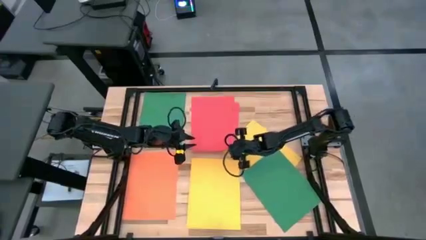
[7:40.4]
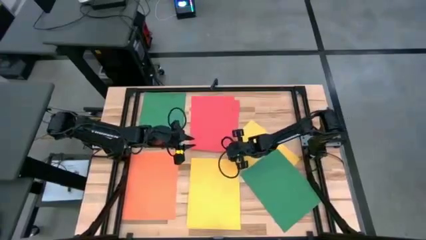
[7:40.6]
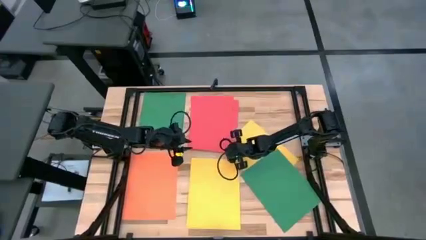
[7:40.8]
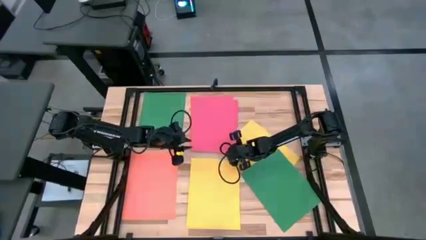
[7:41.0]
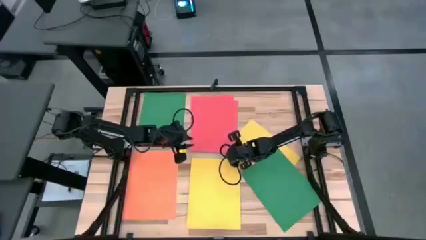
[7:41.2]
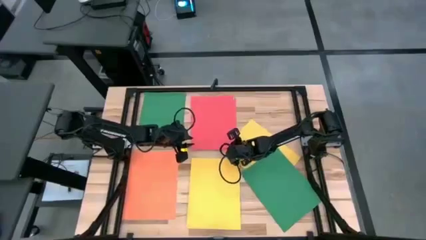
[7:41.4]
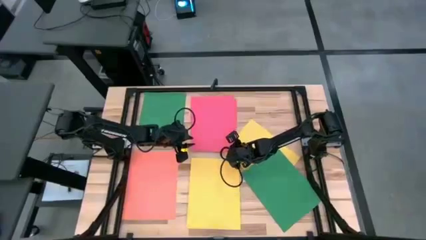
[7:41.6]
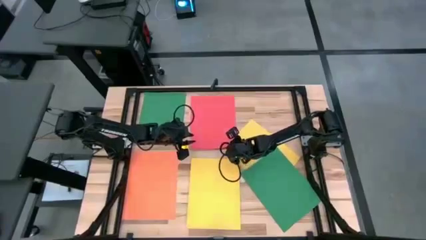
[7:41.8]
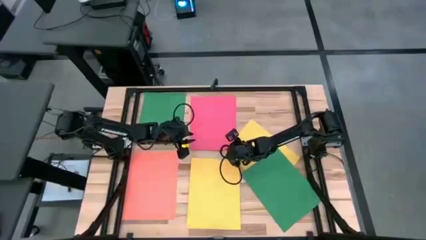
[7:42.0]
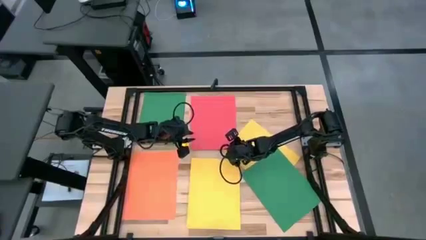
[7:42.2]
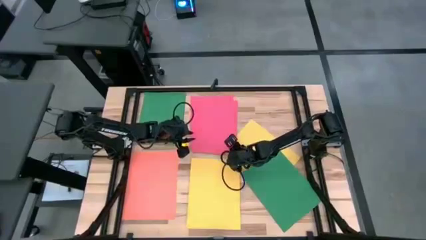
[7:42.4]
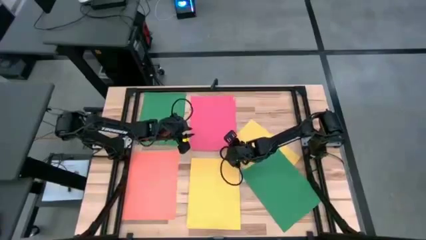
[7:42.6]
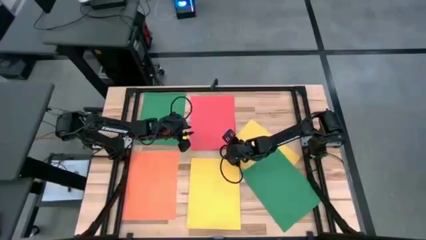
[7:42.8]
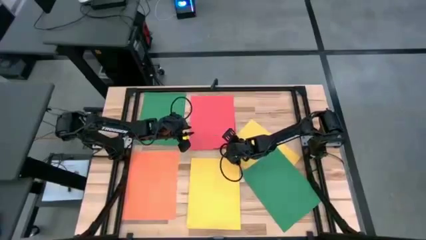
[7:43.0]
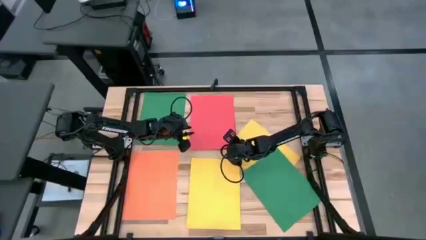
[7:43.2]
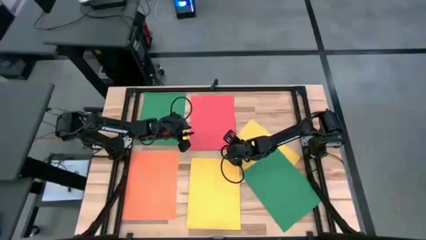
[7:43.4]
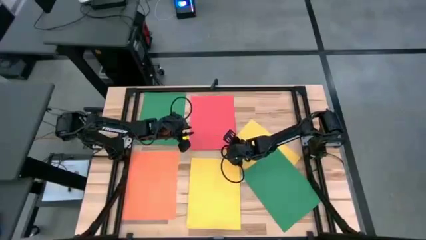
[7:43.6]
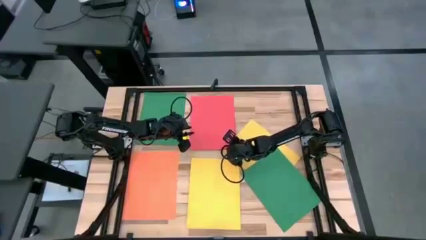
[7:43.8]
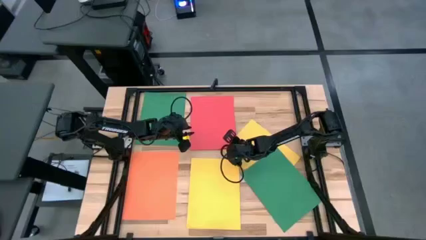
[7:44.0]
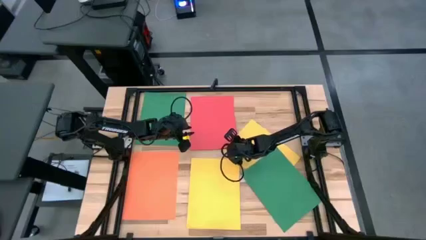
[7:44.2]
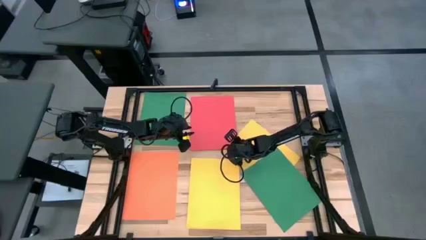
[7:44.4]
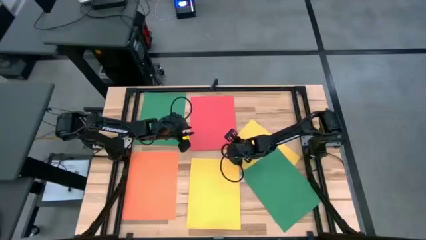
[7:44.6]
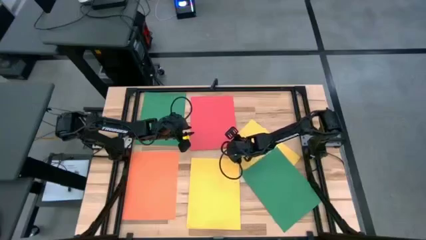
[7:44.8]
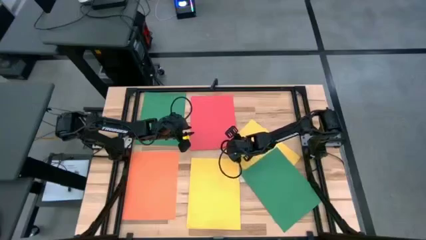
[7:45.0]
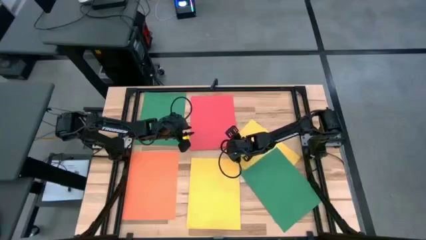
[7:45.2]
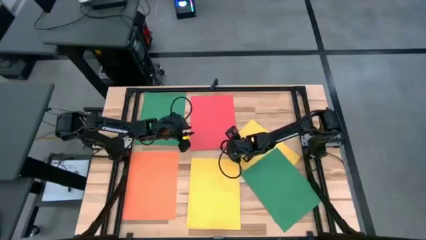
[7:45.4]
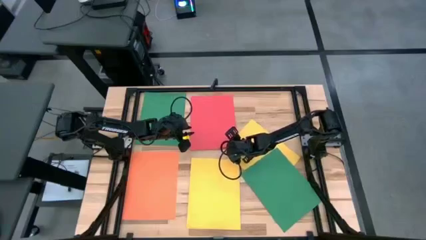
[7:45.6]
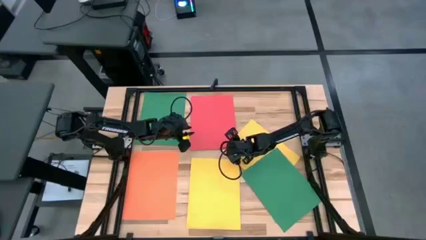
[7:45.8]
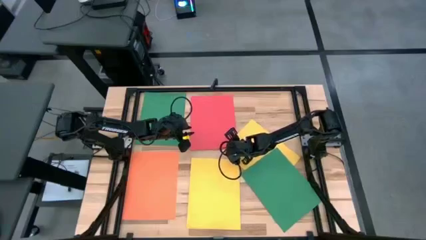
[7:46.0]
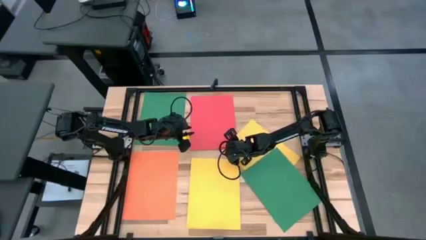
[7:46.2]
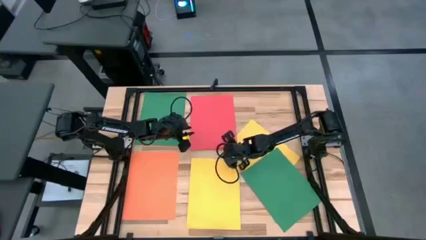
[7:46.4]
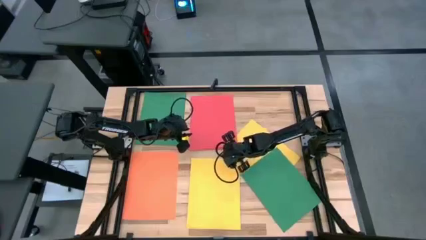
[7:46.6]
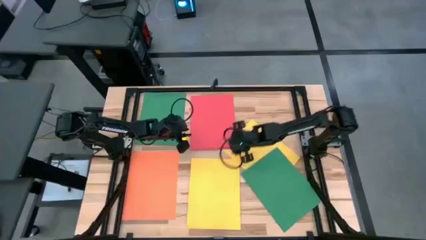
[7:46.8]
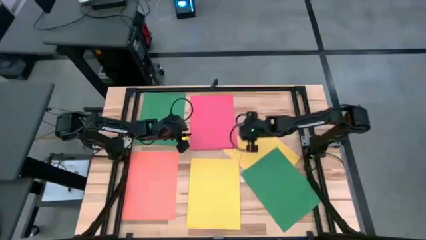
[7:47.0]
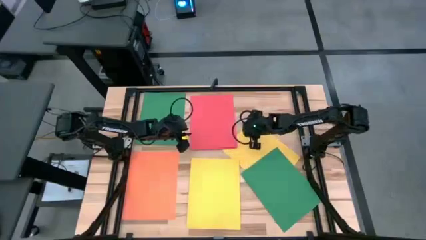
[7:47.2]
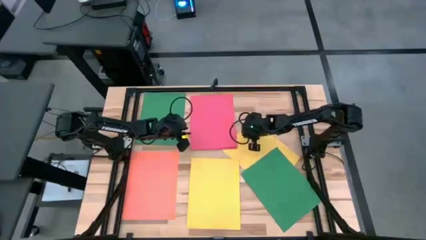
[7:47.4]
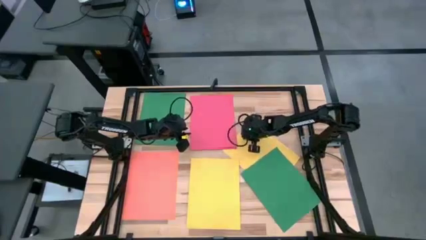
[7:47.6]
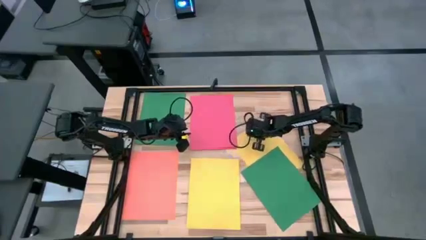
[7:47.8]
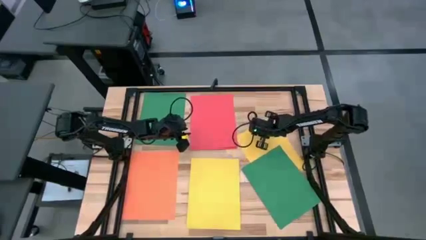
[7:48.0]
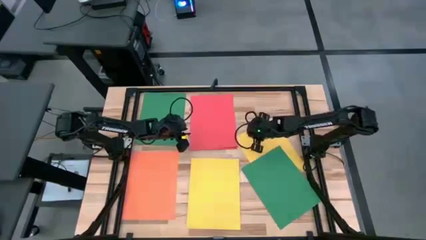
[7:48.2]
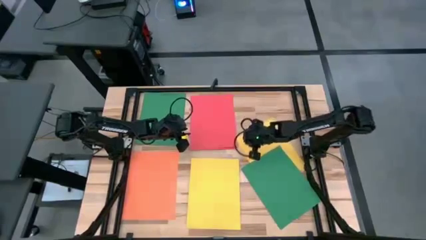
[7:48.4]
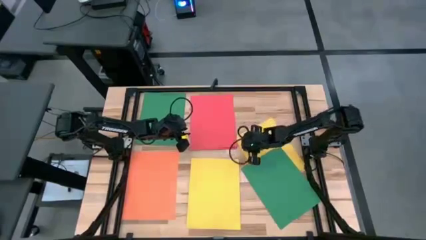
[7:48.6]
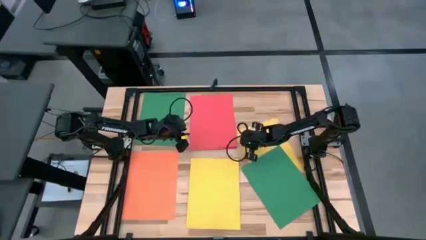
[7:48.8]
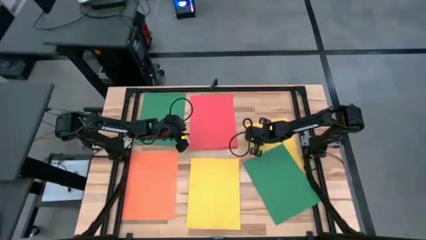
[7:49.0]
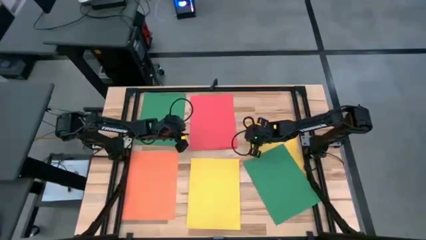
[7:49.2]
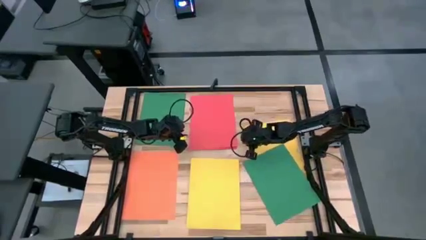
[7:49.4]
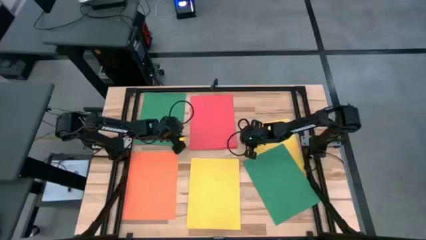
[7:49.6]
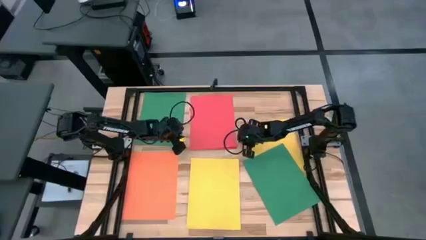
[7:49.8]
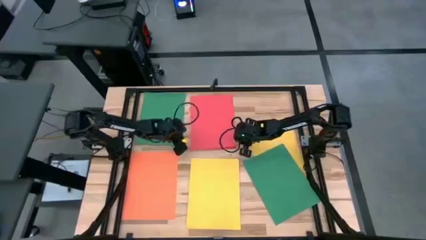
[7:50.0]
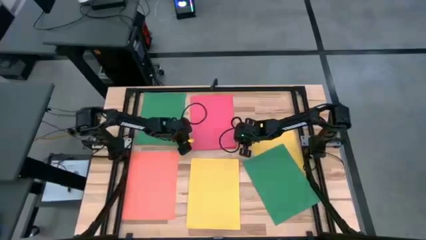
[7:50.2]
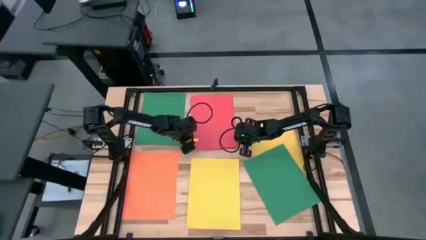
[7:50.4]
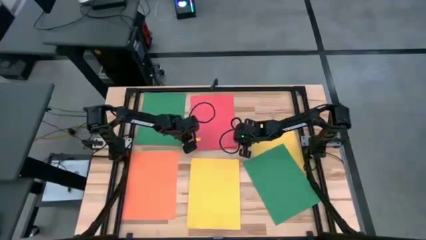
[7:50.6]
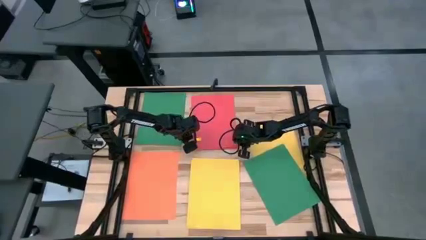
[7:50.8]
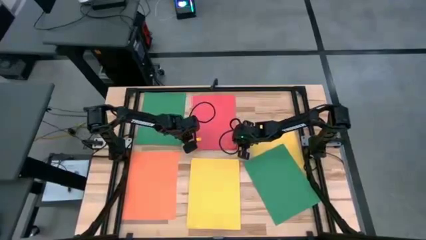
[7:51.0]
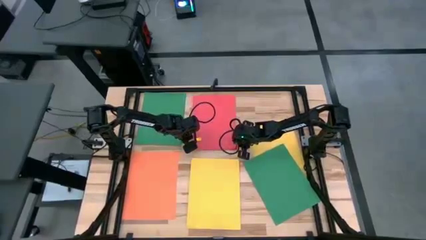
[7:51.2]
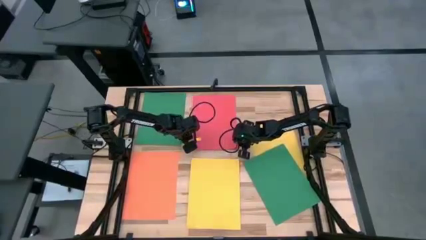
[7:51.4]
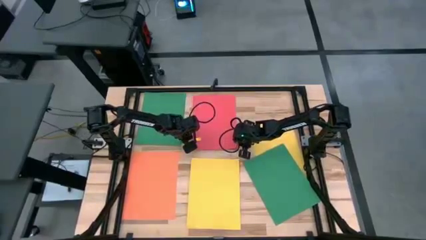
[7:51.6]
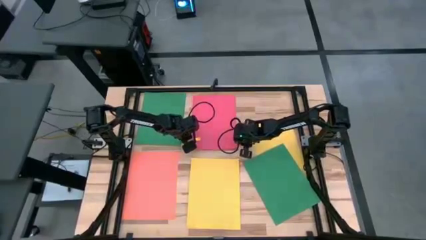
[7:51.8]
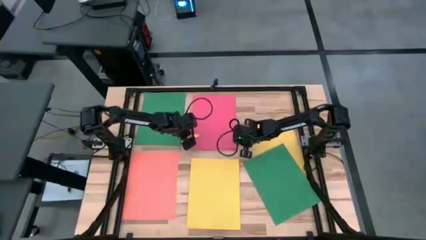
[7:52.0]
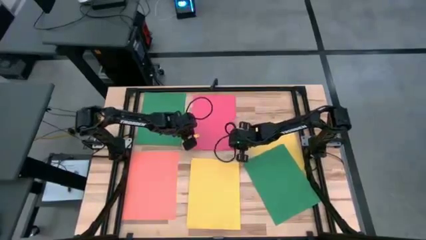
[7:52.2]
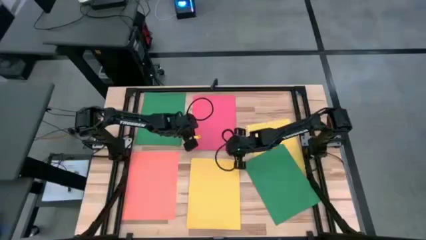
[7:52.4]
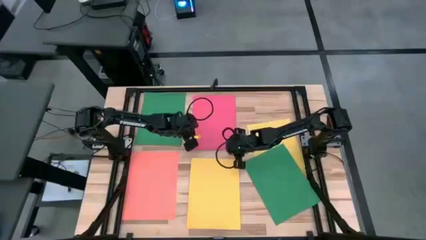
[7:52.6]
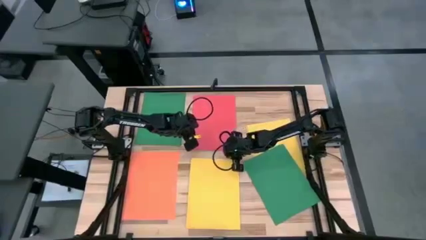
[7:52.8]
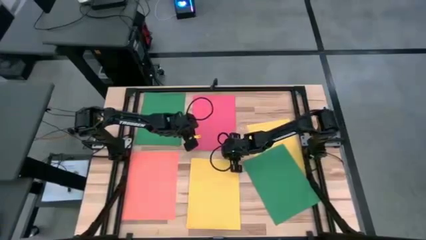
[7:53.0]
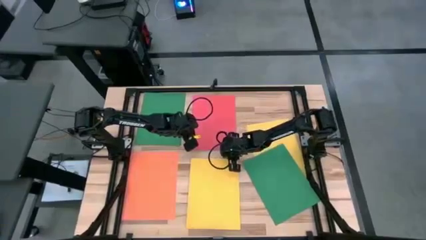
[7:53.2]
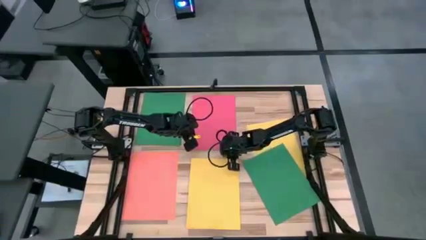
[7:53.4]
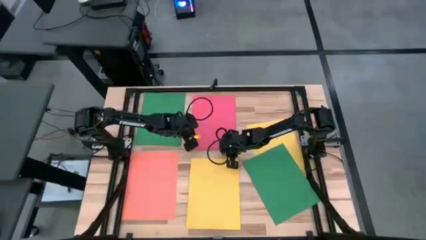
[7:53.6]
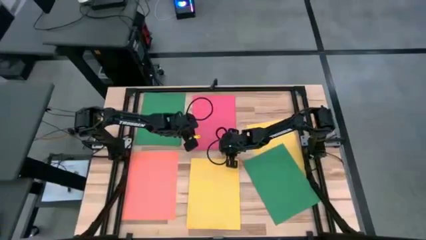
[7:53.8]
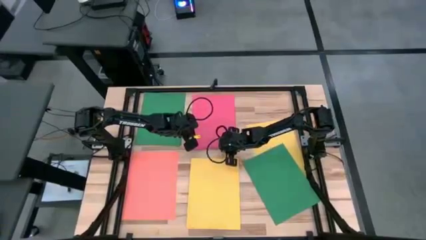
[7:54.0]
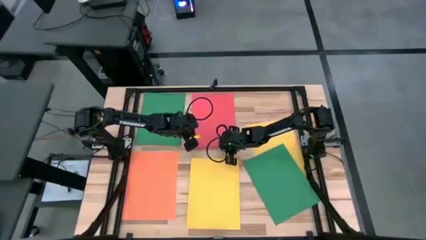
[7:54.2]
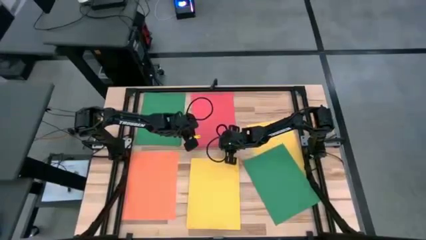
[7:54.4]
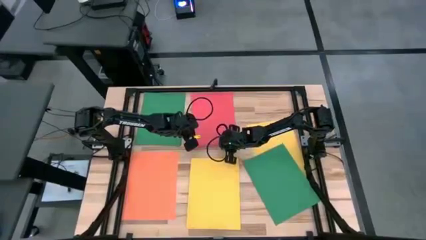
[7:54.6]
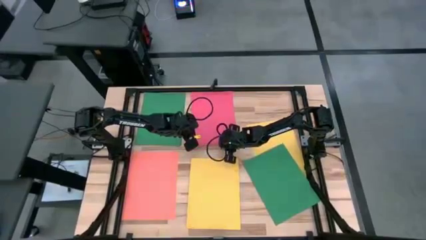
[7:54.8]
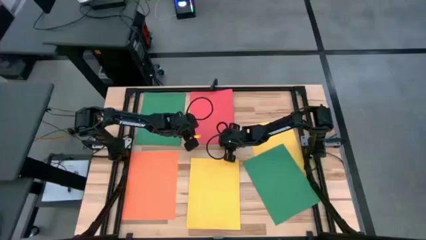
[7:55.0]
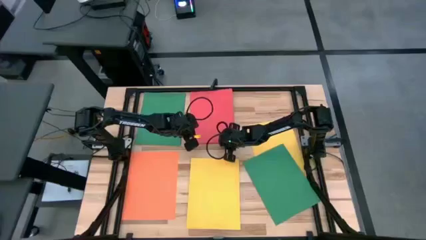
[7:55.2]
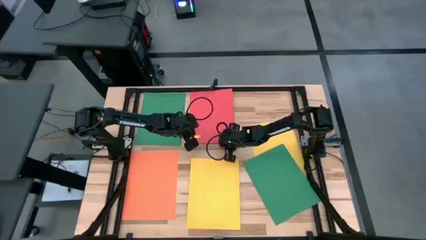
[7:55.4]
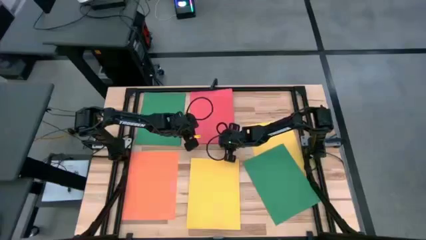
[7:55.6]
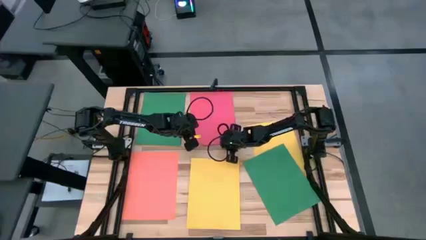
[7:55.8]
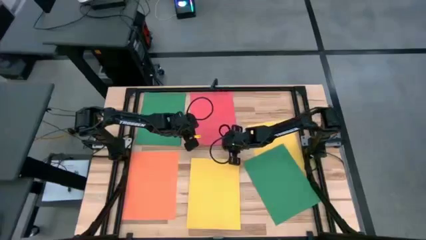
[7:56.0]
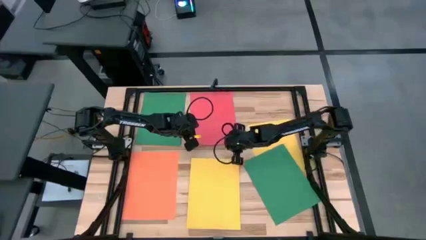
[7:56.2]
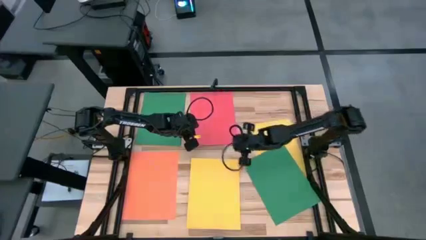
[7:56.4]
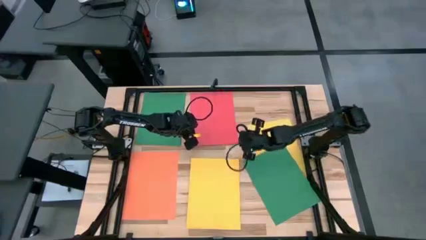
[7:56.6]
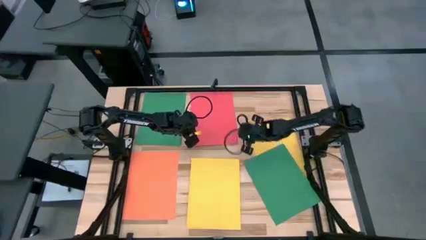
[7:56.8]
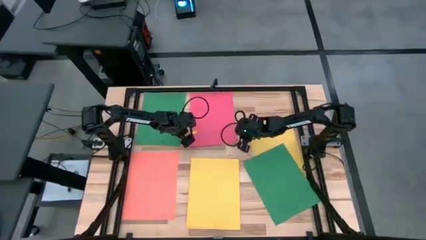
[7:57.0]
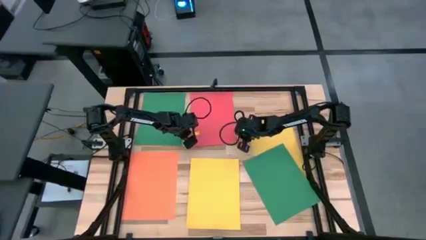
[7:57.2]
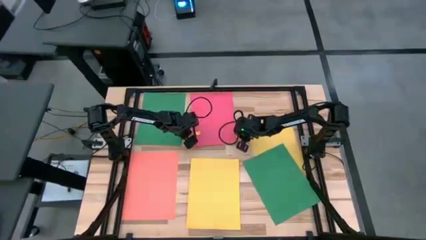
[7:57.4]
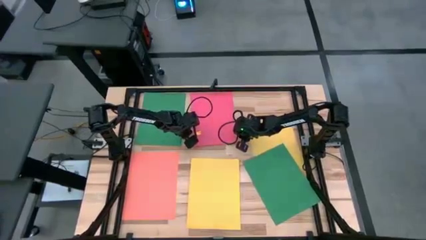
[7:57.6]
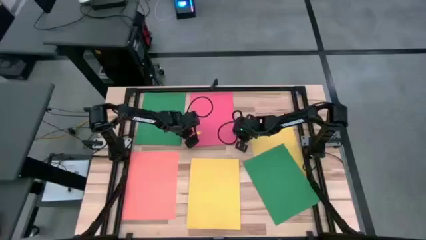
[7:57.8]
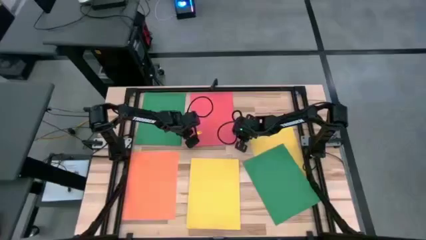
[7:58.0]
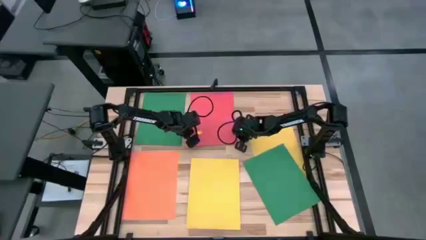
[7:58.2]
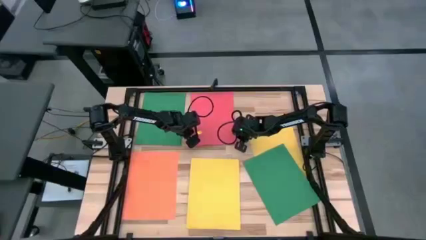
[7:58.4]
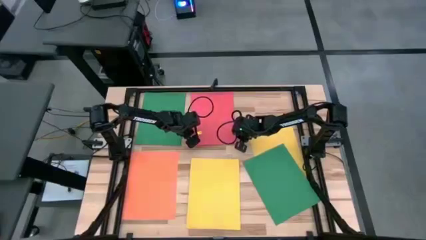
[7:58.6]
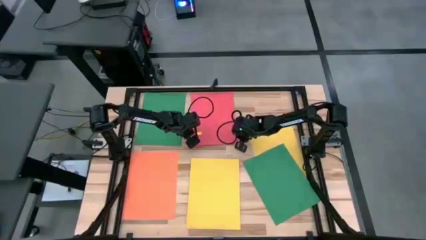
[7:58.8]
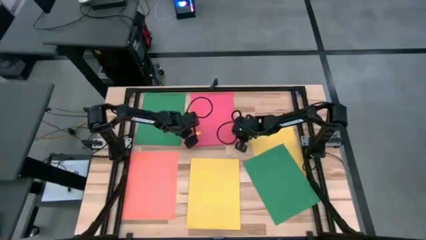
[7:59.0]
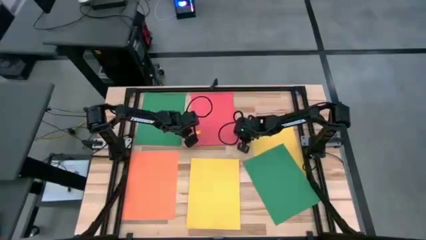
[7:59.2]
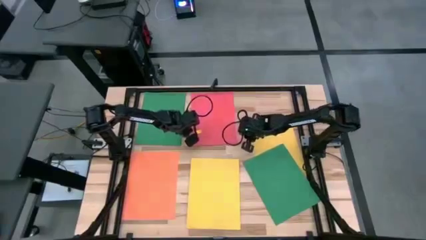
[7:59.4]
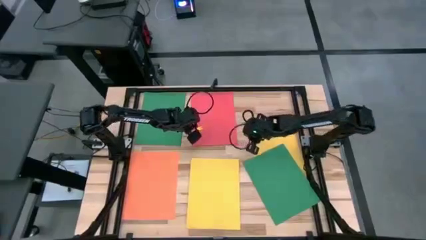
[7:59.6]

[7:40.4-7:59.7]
Task: Organize paper
Stack the pink paper on top of the pink paper
